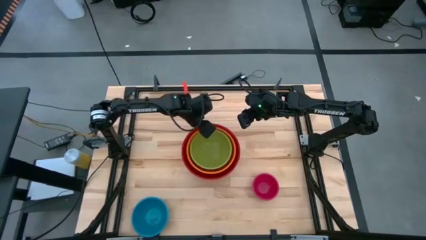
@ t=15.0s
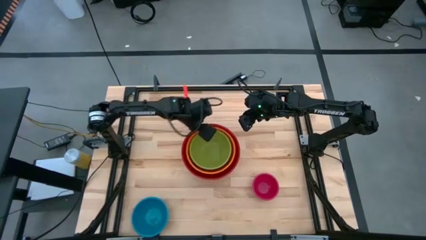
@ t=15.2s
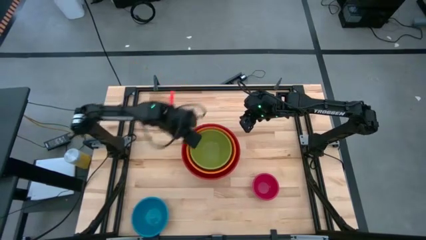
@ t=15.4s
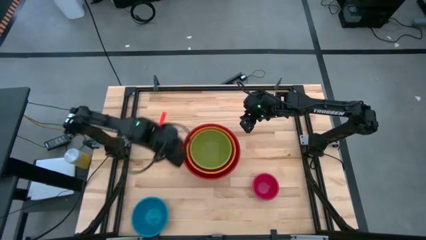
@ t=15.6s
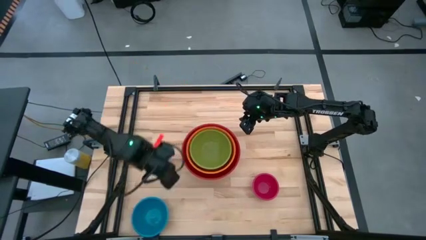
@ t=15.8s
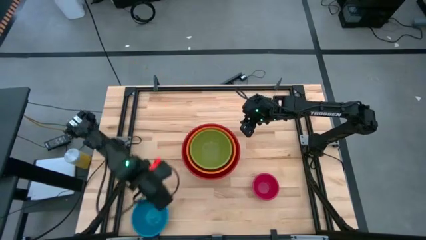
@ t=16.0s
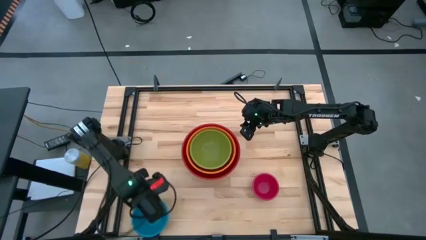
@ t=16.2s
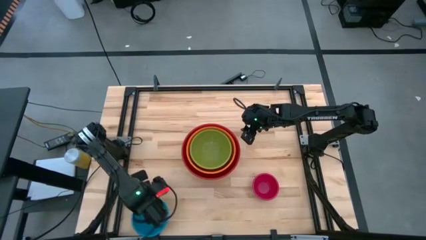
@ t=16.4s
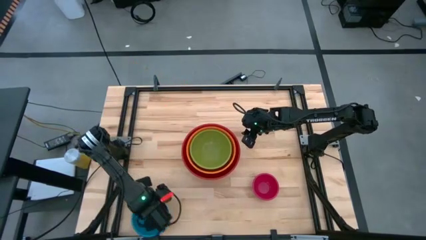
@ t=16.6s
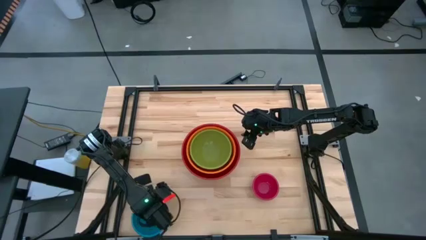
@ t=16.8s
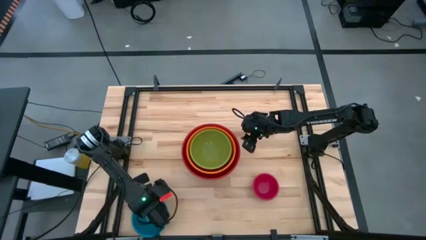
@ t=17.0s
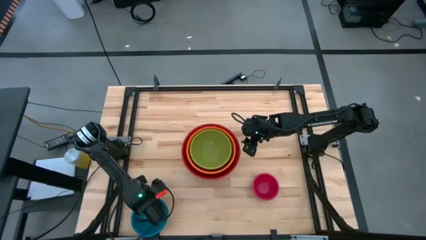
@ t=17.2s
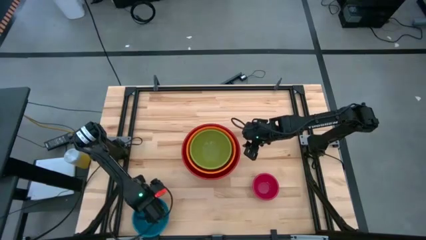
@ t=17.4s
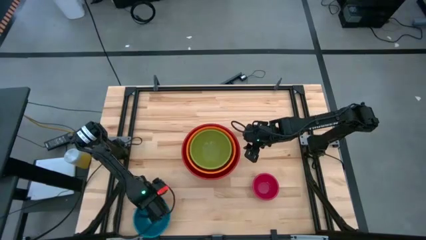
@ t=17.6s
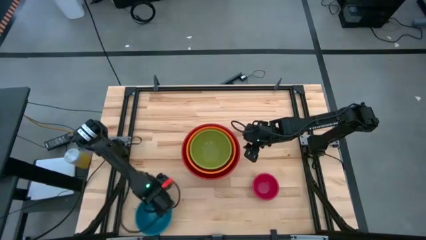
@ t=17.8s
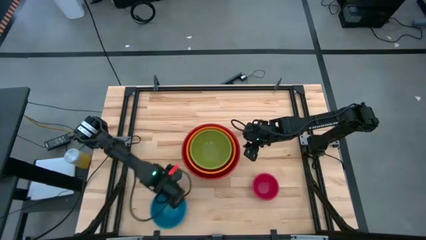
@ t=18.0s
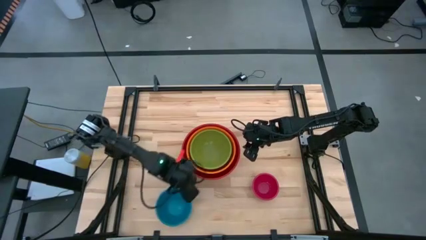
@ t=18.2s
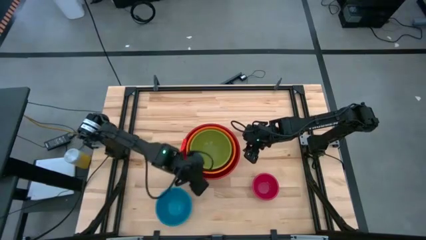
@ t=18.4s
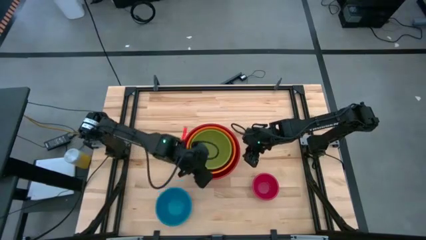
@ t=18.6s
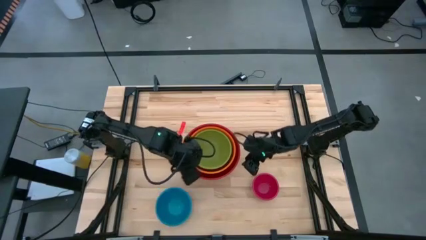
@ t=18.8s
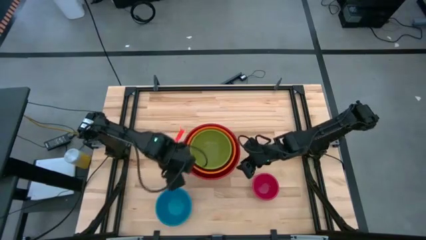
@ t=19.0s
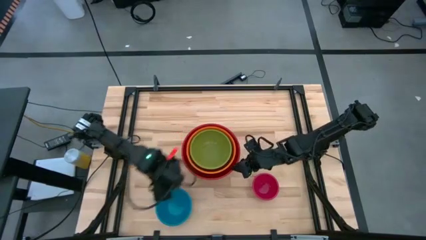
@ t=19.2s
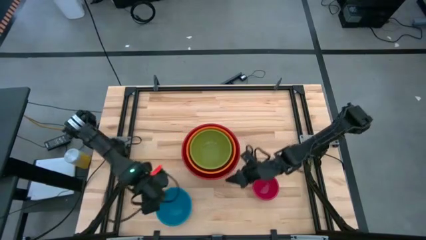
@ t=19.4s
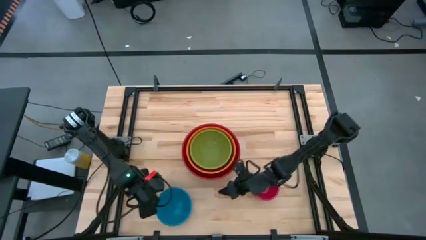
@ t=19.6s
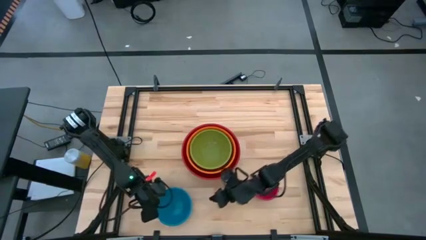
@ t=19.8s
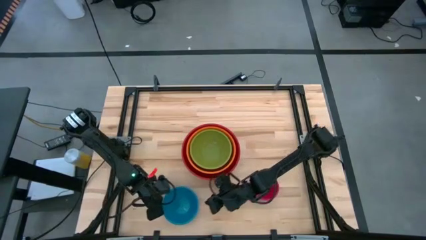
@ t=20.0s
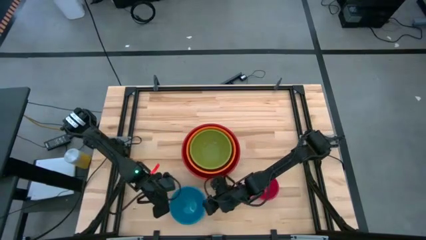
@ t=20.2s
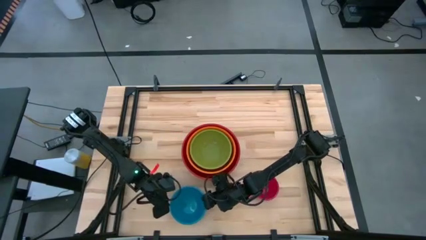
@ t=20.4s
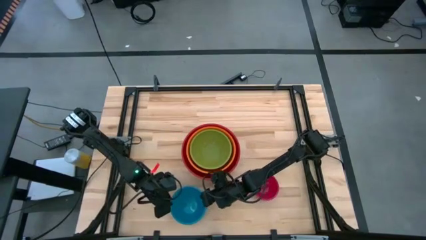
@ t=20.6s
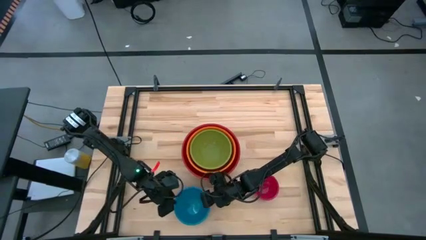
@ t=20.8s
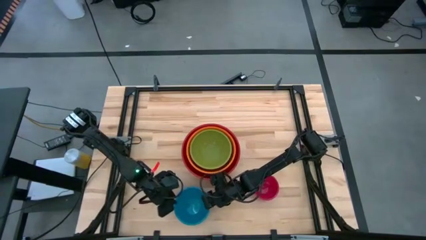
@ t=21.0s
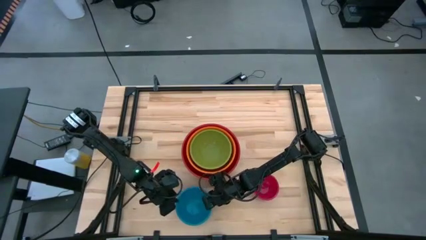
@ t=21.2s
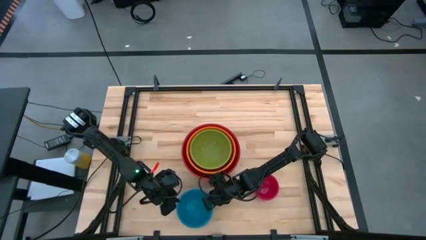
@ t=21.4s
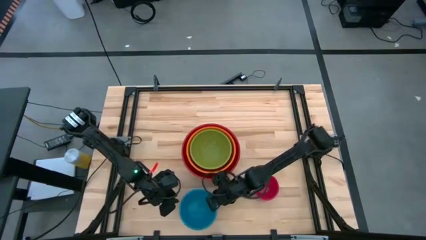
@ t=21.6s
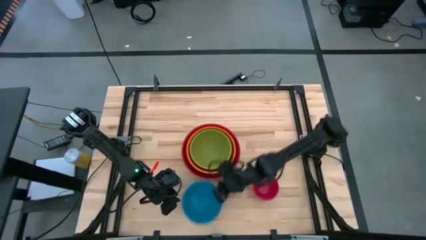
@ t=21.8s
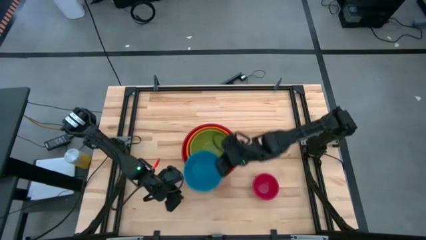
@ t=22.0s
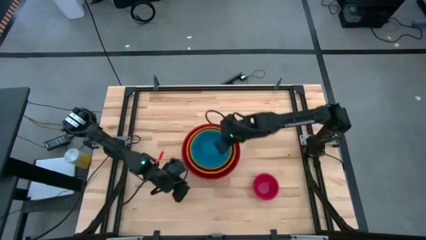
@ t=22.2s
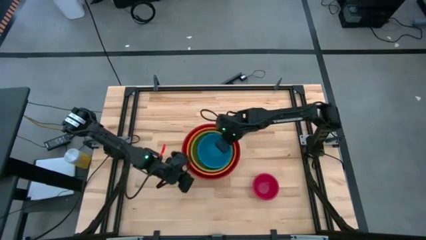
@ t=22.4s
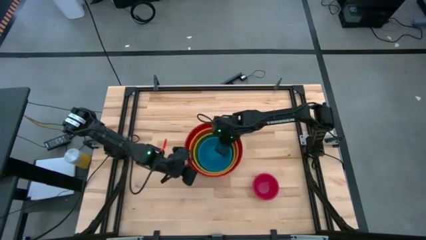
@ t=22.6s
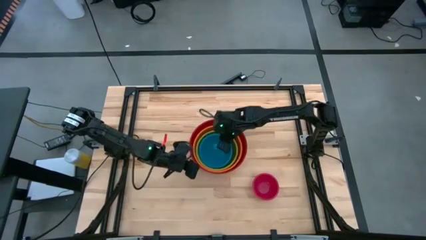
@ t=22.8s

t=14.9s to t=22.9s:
Stack the blue bowl on top of the green bowl

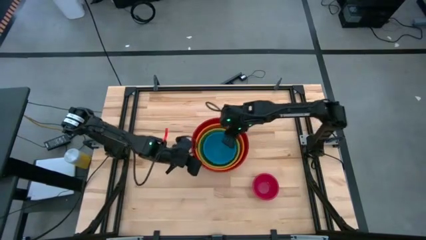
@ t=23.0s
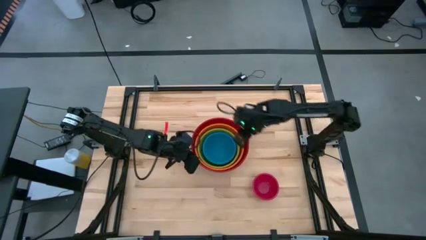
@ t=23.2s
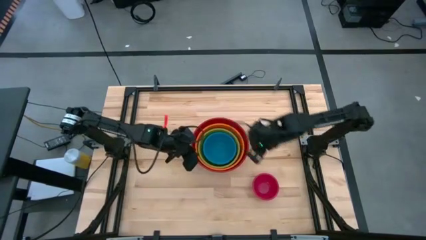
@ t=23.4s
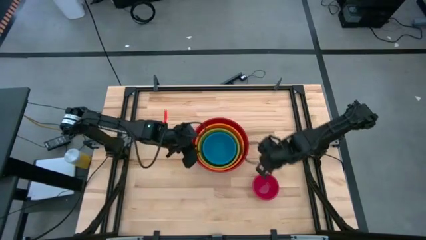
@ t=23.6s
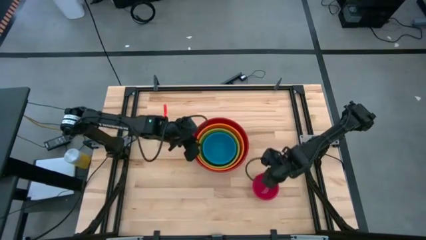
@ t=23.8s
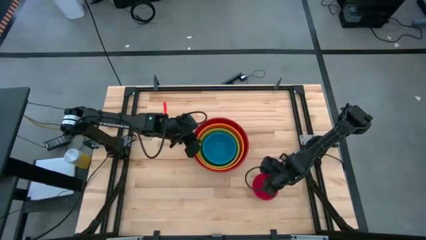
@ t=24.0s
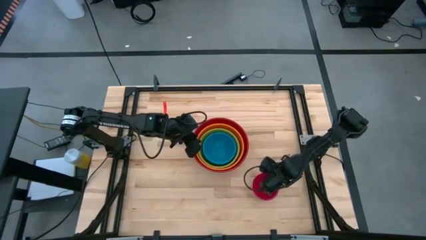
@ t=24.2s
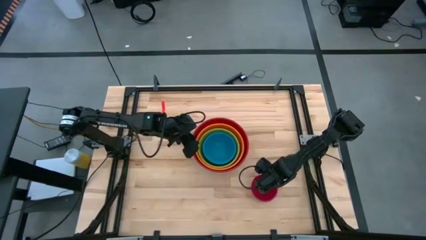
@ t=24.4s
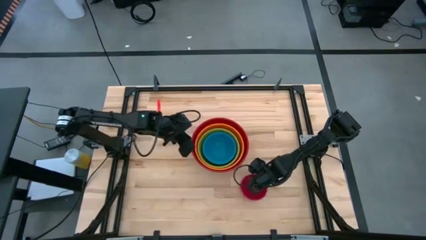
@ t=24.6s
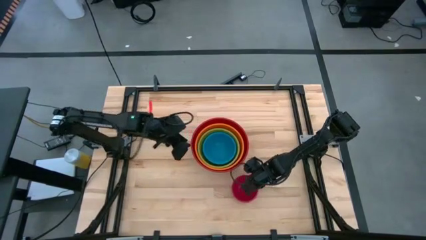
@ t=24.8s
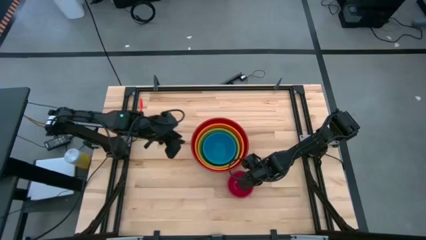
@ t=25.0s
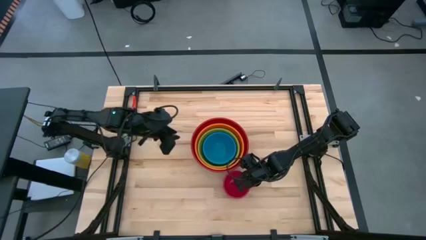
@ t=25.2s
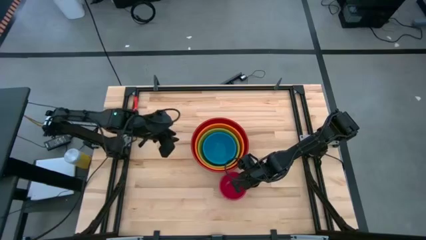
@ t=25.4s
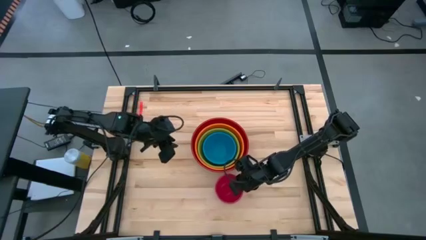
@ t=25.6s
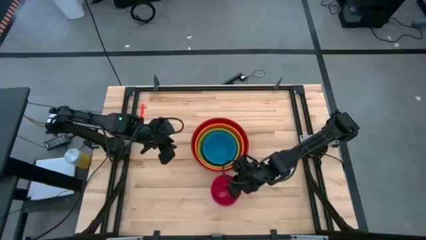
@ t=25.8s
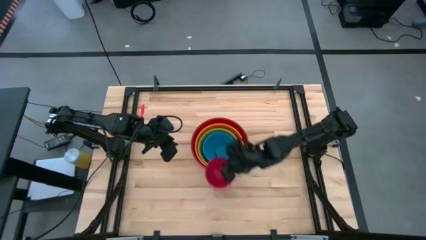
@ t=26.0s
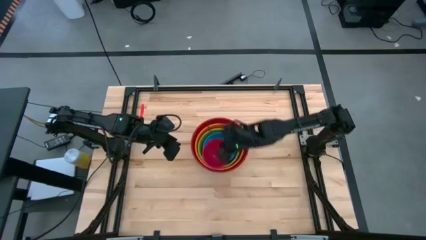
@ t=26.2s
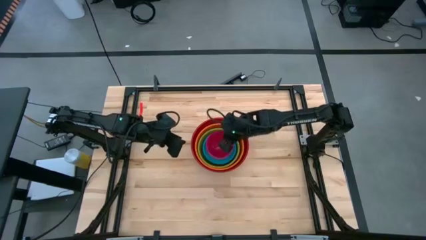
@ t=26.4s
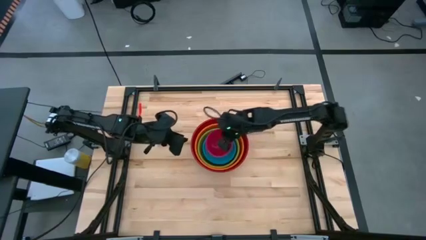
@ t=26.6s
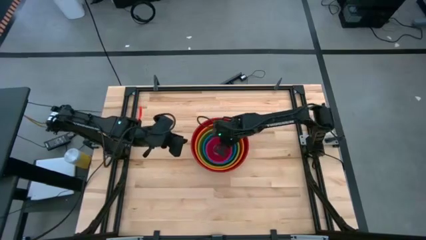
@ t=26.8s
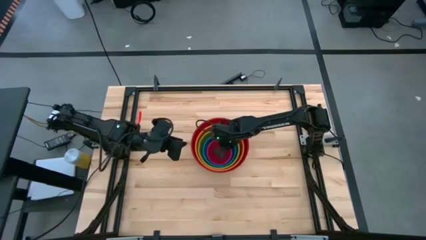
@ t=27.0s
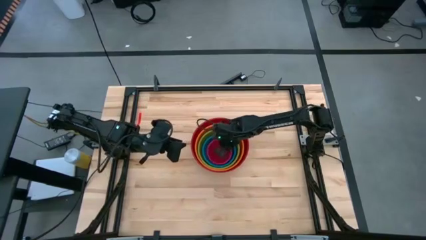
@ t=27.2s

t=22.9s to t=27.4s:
Stack the pink bowl on top of the blue bowl

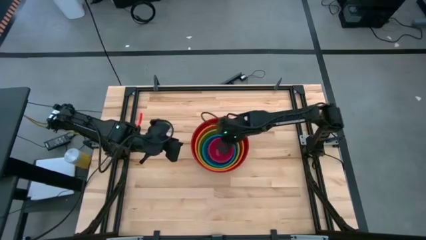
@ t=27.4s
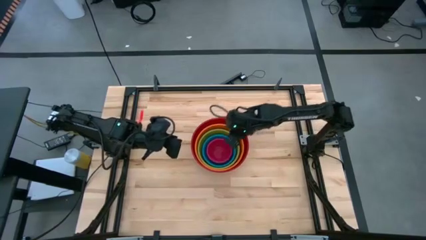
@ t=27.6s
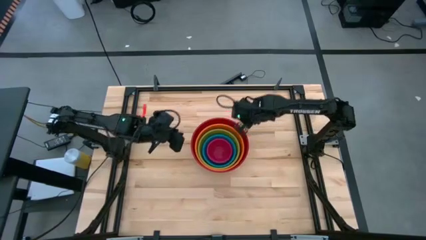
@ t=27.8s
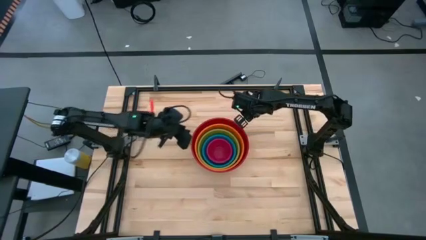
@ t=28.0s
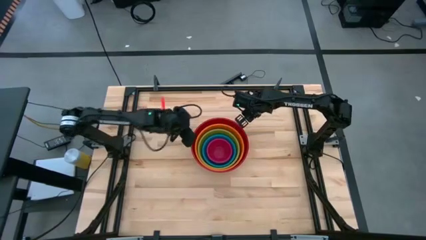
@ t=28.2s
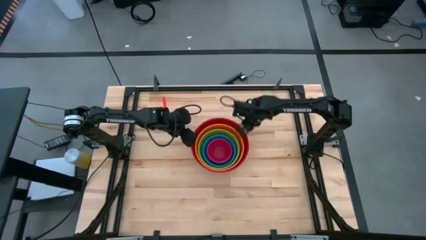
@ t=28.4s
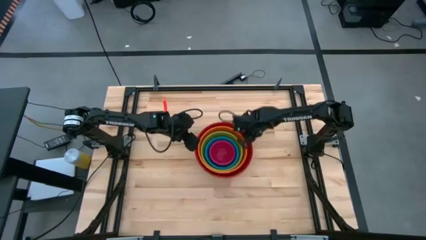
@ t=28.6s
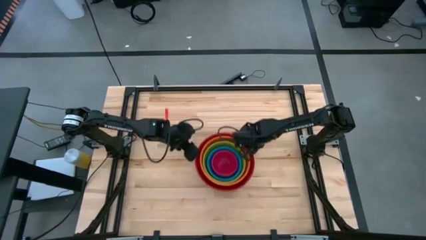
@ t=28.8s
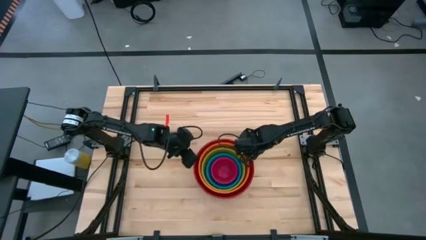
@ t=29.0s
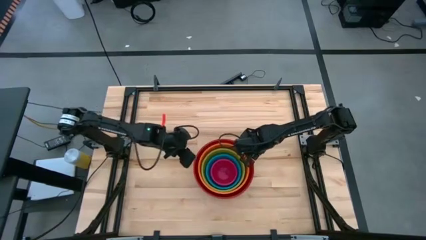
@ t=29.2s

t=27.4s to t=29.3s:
Adjust the bowls
